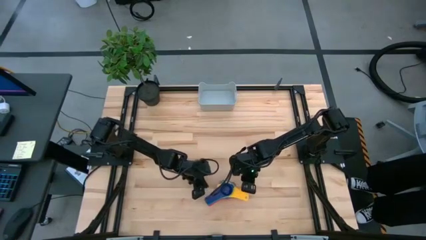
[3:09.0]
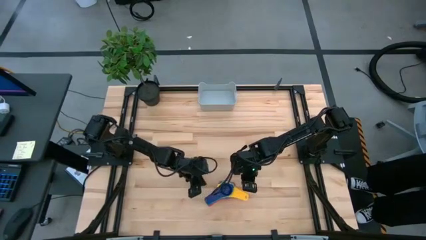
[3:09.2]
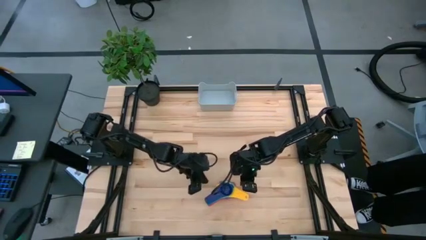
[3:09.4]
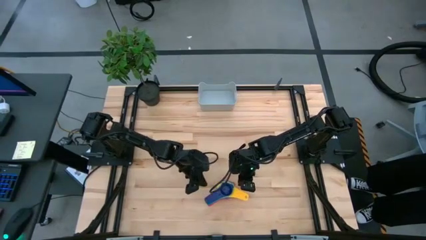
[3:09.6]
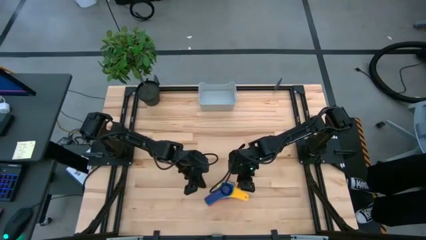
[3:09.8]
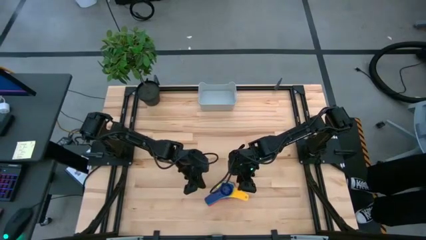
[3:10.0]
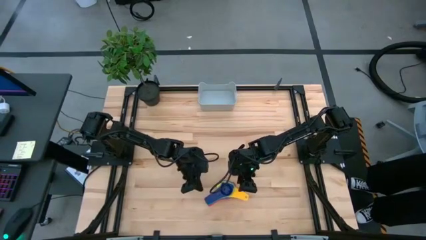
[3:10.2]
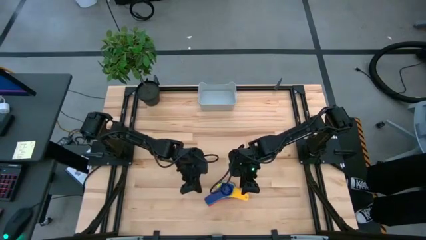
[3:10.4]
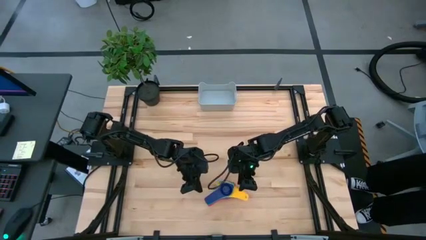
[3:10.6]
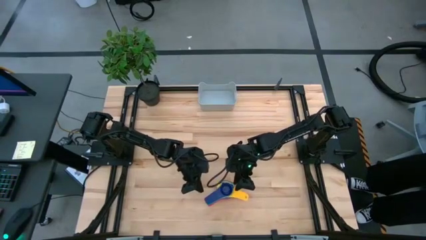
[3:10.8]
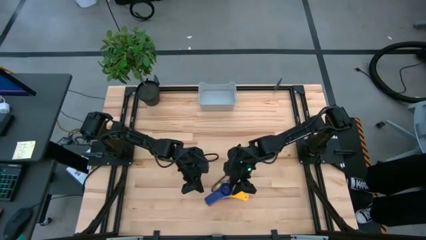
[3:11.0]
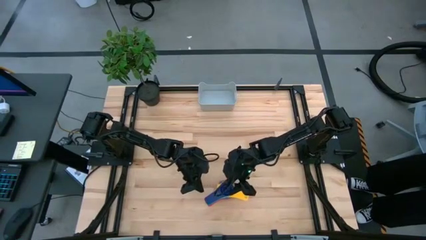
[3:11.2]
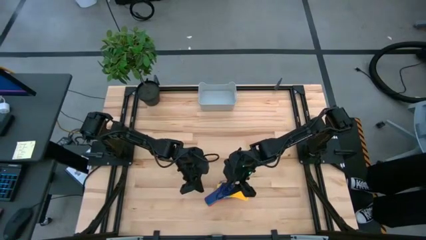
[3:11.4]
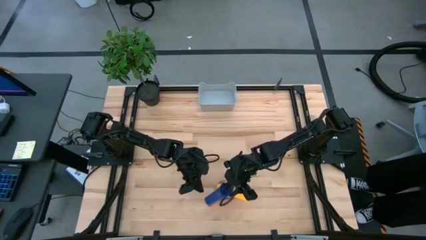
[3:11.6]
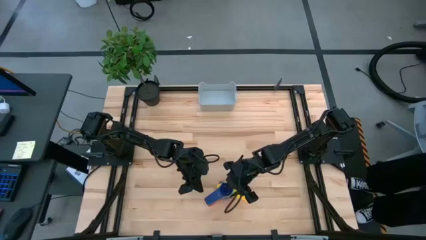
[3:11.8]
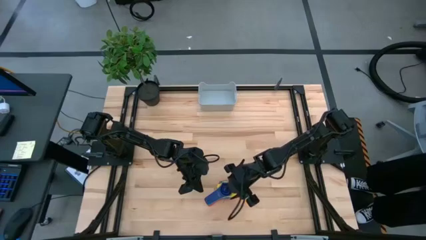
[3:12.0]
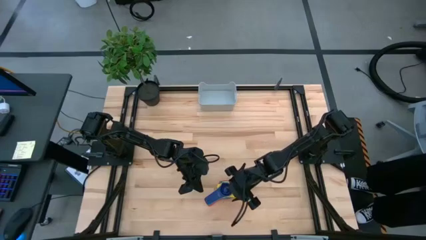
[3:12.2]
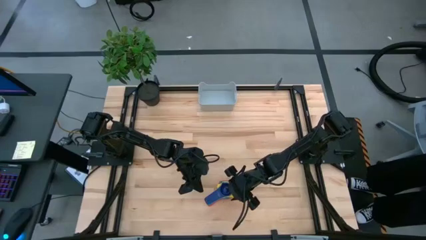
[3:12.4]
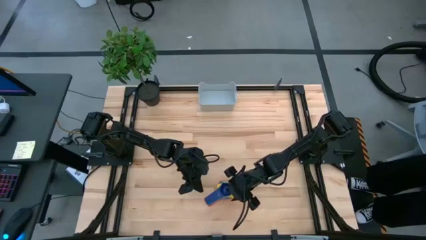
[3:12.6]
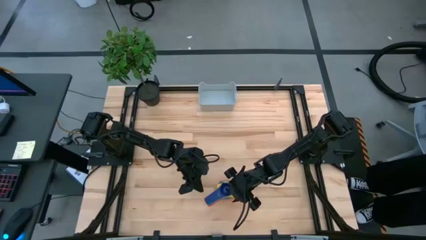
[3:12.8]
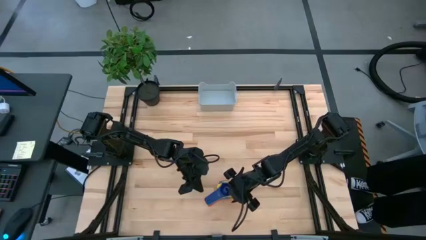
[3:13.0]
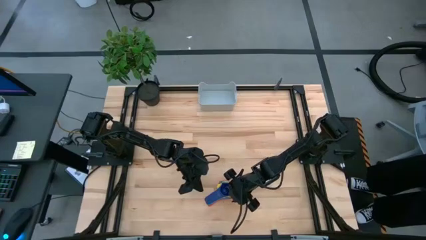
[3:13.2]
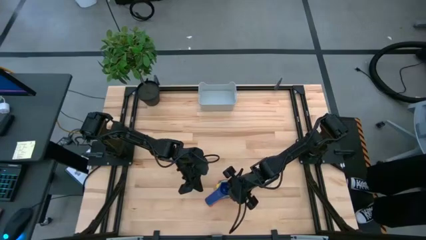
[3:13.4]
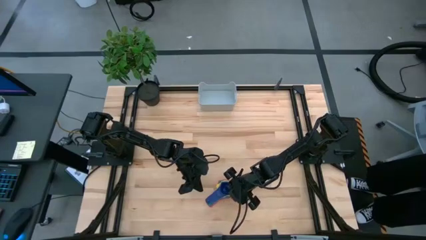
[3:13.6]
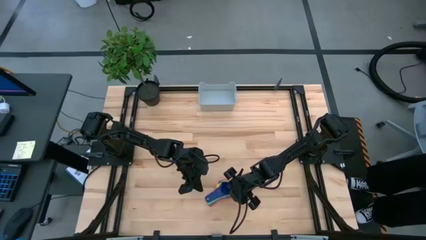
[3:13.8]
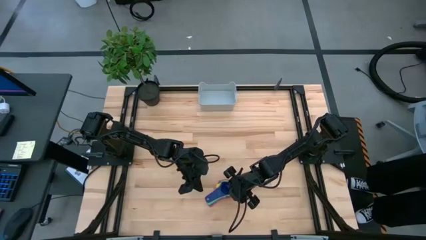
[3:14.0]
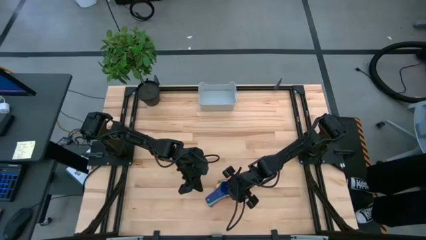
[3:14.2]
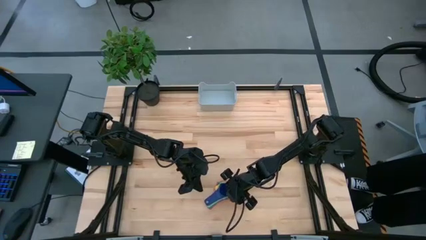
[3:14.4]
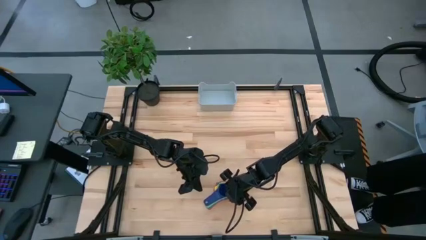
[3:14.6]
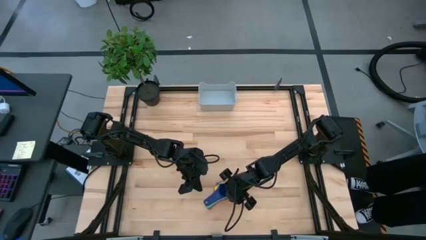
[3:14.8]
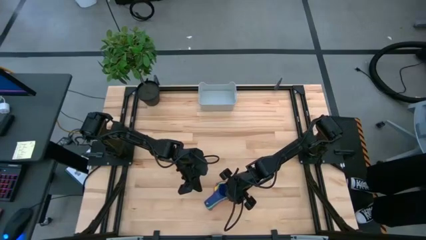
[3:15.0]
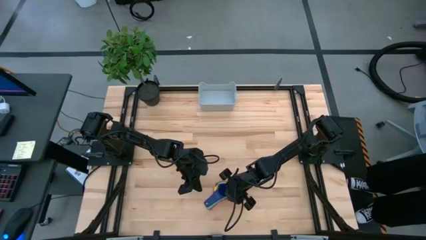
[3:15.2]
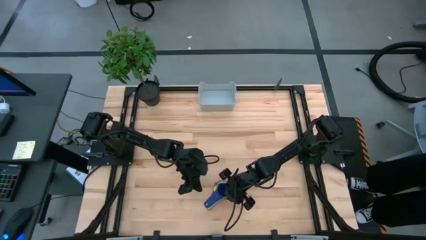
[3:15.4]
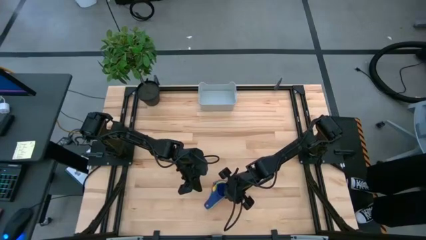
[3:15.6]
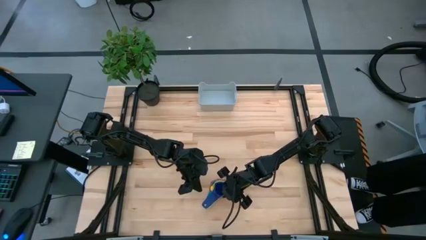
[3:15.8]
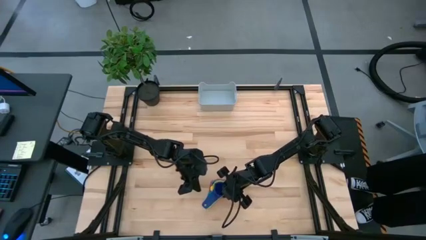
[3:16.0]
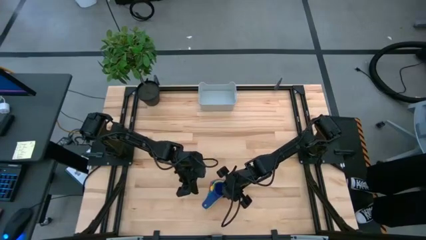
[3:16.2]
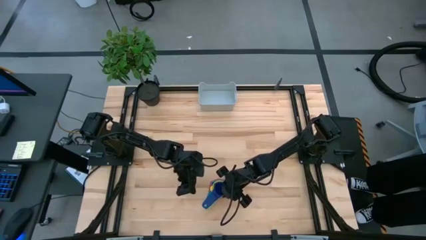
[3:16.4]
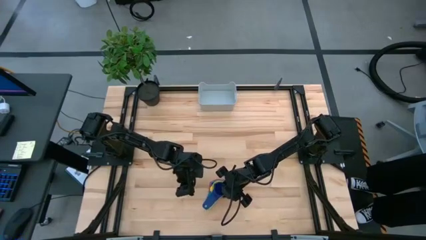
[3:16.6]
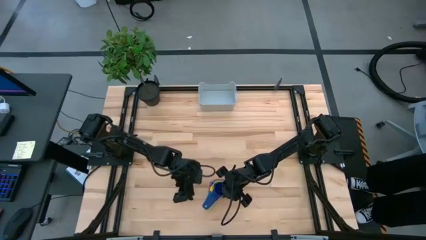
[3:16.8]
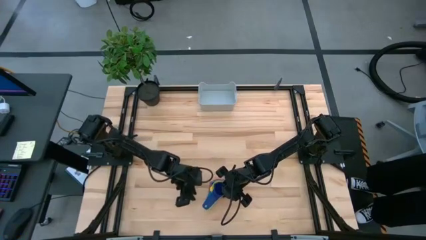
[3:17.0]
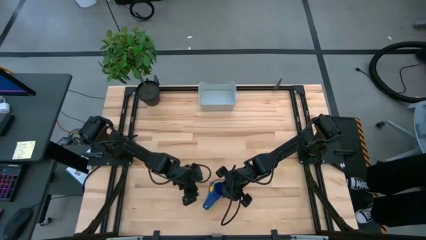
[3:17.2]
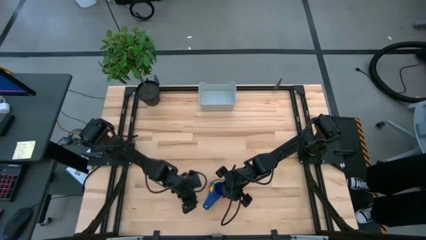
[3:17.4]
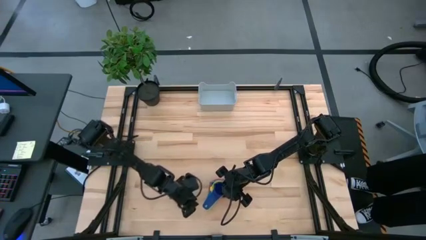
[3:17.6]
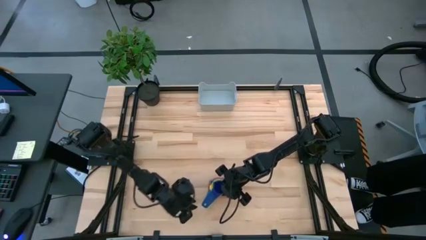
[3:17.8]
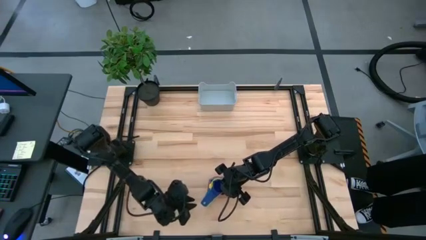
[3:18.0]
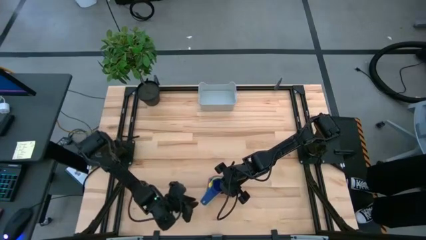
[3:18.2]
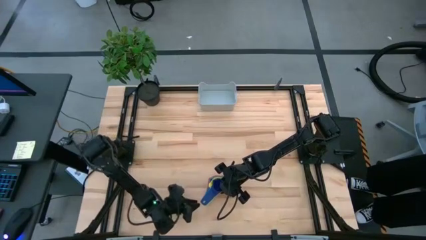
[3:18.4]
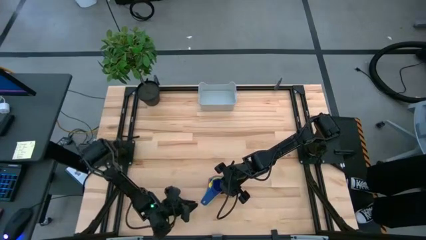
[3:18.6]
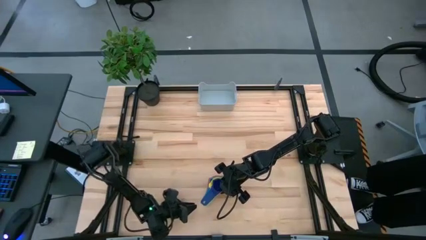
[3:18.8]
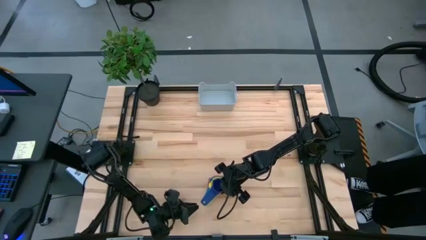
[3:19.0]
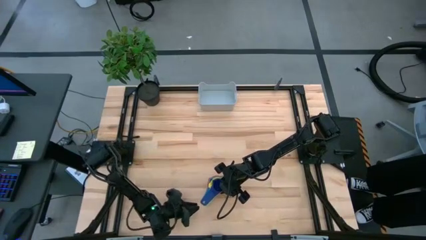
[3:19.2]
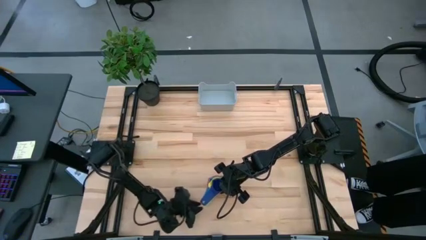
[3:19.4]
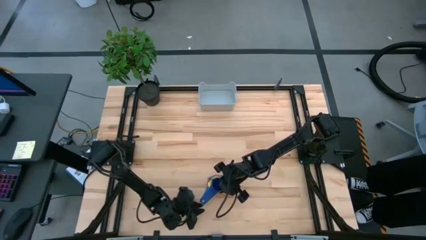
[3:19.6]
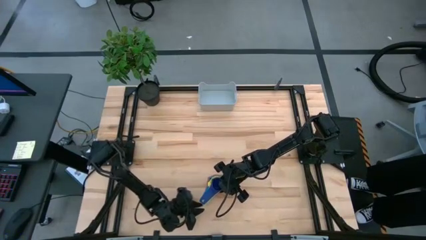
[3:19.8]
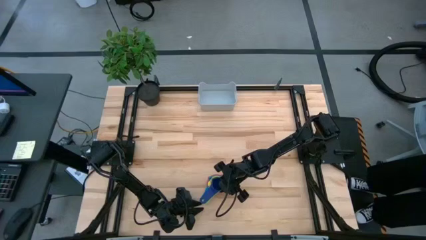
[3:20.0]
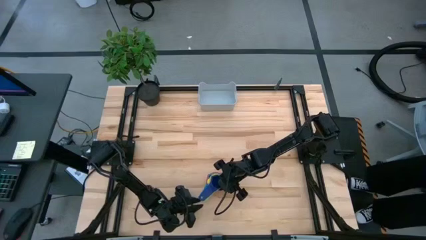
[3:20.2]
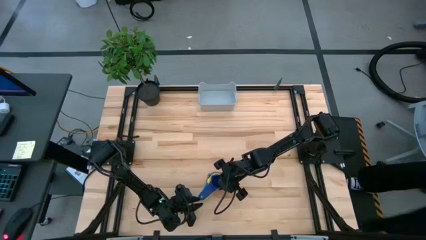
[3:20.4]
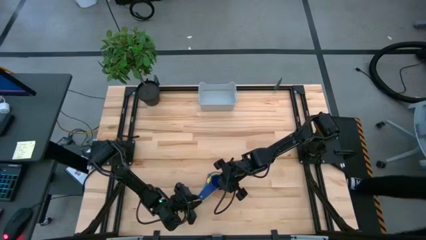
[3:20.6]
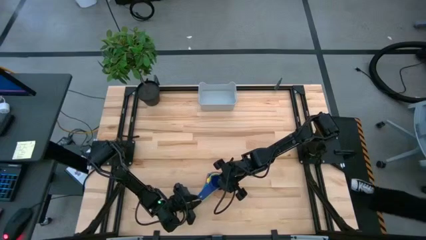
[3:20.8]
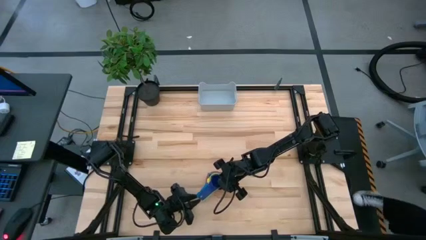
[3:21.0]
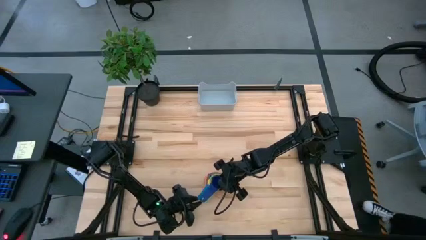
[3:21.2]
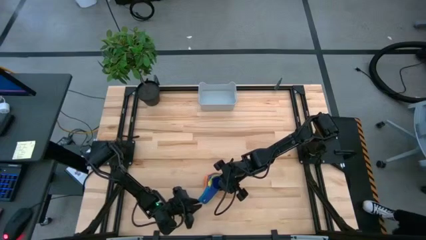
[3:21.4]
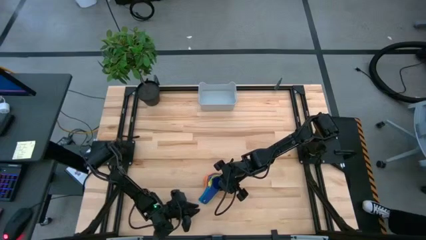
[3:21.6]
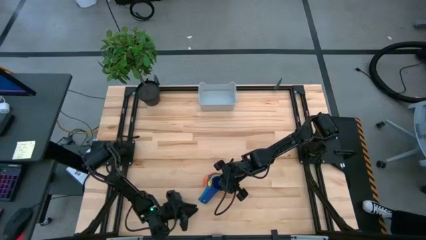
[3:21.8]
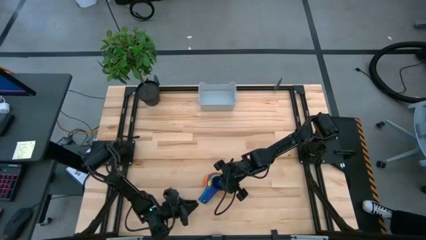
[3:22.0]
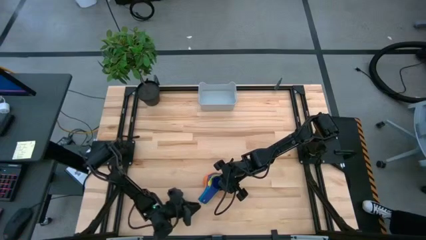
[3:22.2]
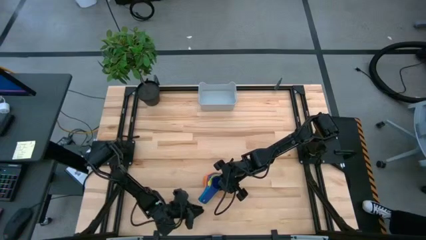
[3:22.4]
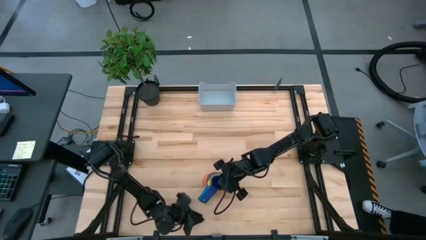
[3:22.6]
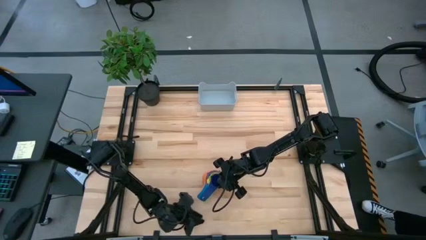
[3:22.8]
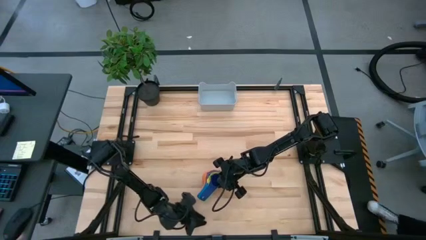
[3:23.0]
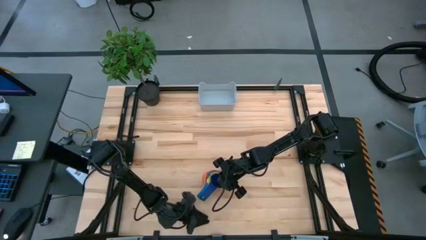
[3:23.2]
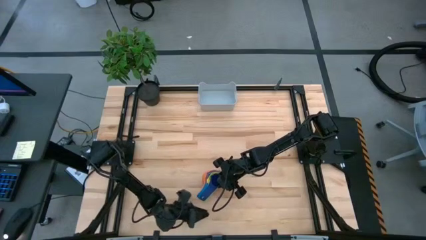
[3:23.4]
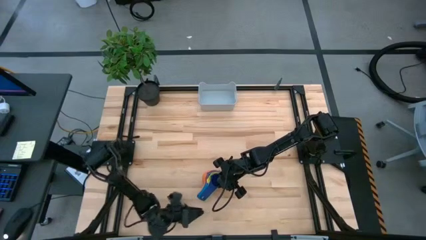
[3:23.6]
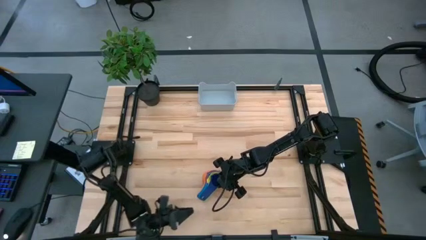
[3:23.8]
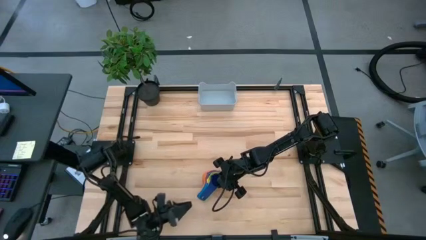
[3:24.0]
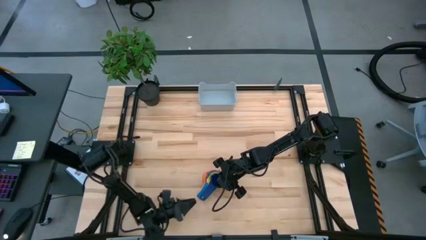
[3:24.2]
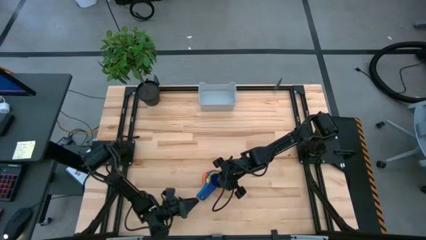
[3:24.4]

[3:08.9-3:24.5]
Task: Nest measuring cups in basket
Put the stacked measuring cups into the gray bin

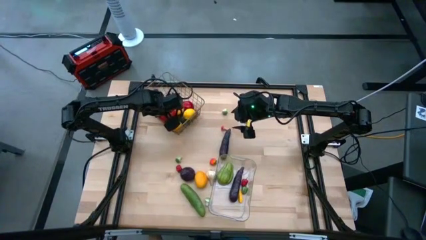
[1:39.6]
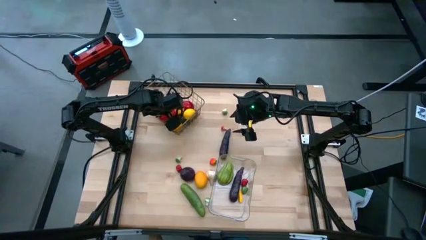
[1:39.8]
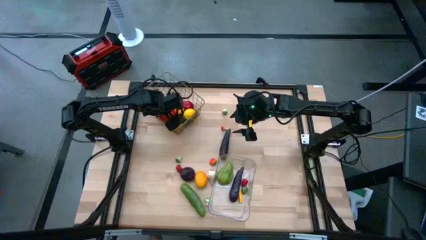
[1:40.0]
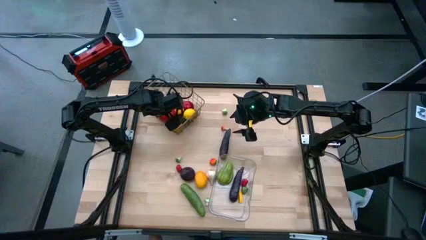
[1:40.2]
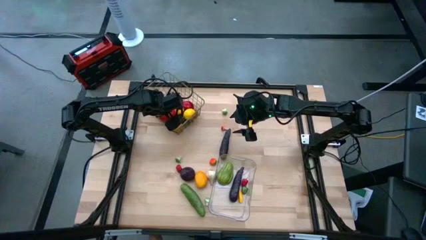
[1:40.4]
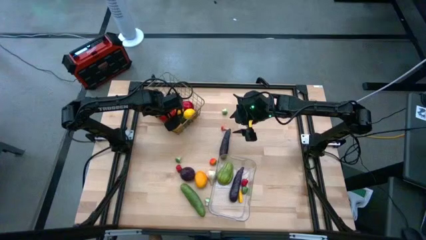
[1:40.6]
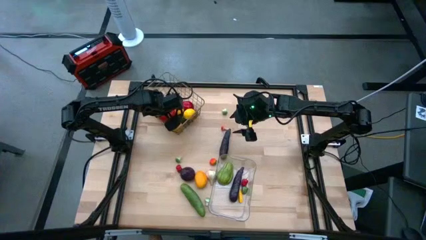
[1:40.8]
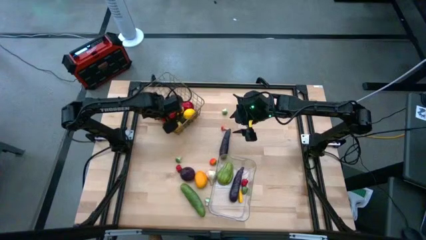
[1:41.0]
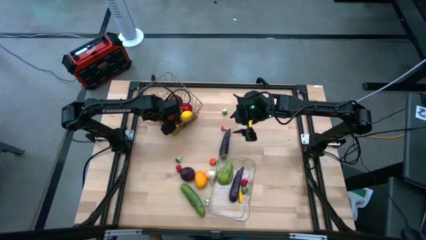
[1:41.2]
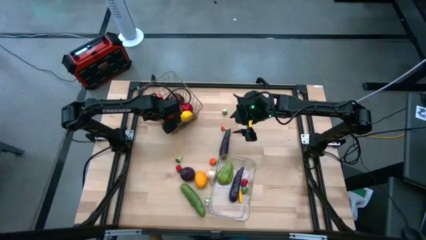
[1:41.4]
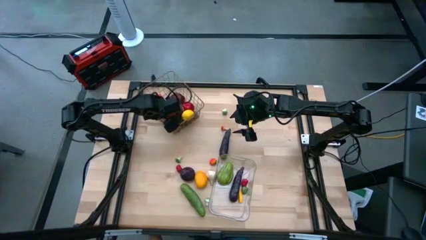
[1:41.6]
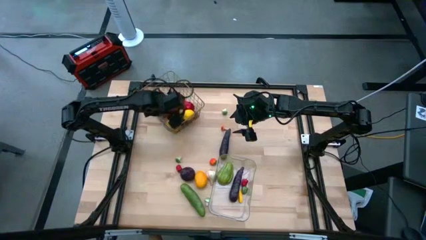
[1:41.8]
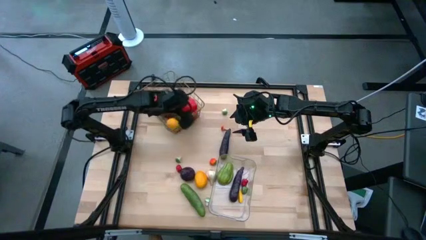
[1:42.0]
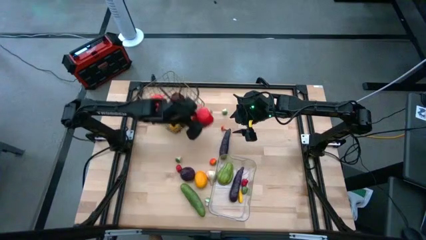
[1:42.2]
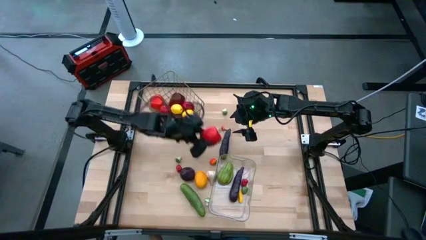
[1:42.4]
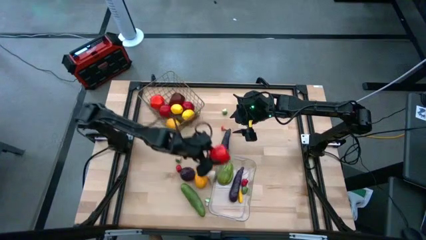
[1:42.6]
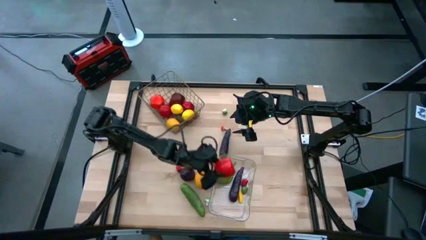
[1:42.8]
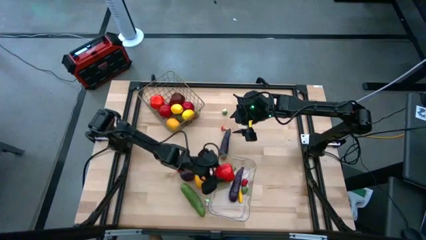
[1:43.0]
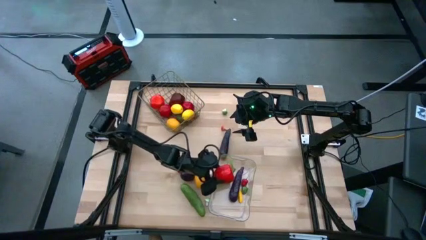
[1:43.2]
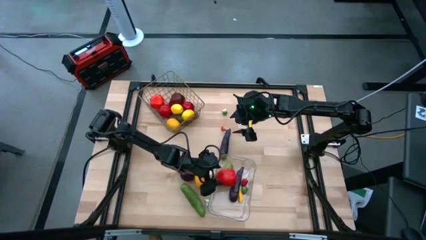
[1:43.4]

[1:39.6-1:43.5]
Task: Sort produce into baskets
Put the red bell pepper into the transparent bin
